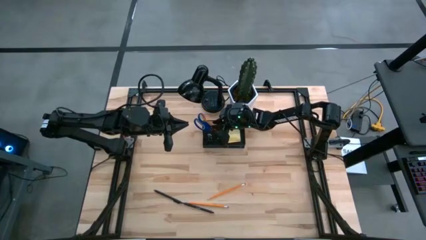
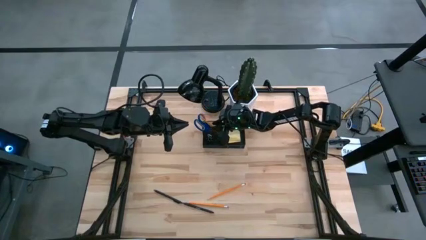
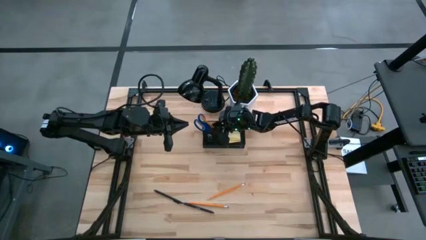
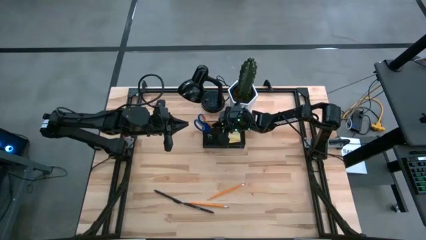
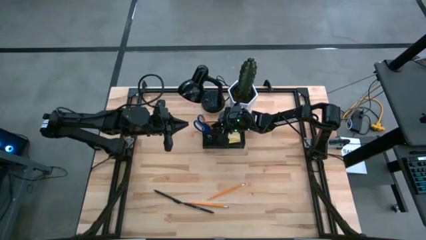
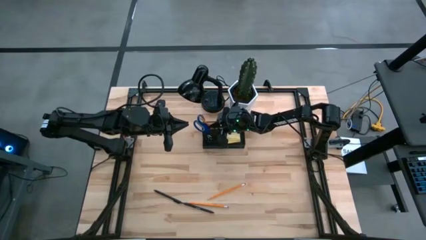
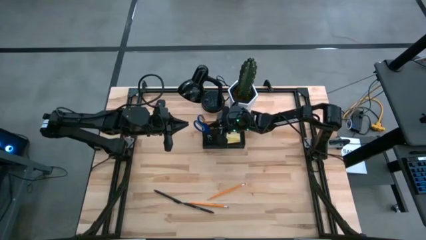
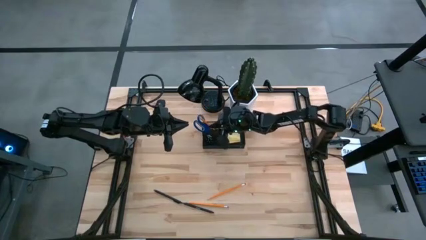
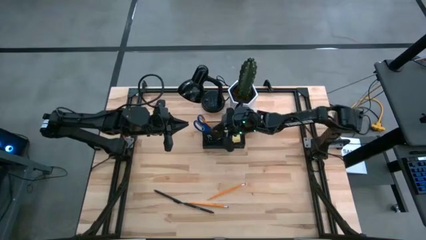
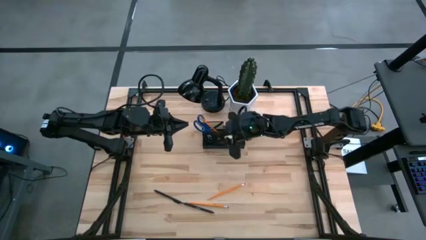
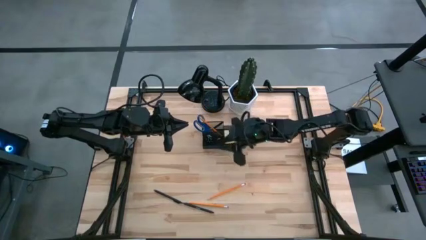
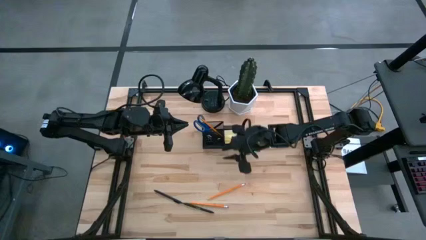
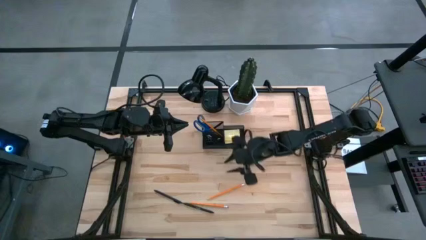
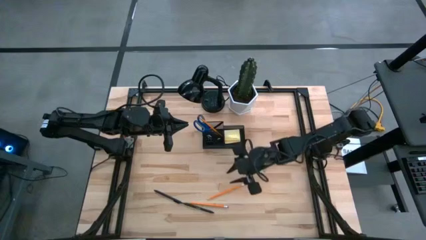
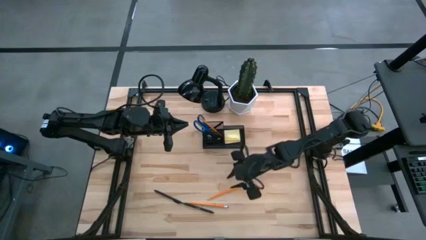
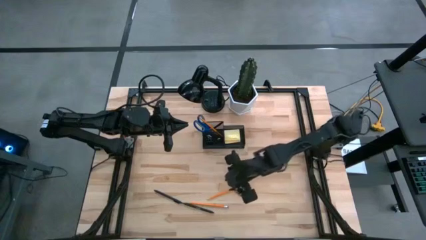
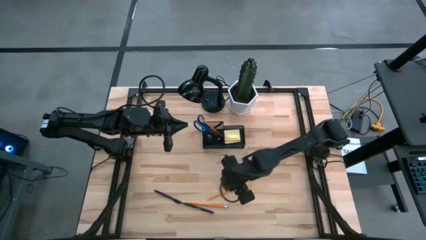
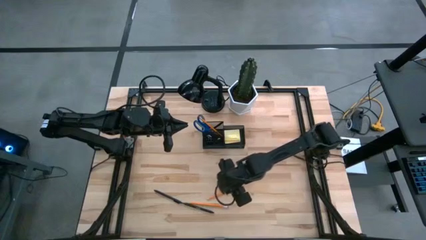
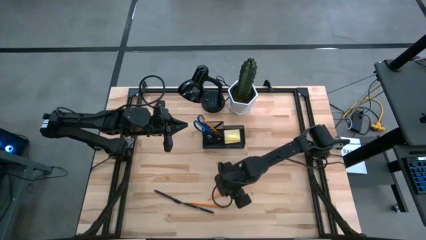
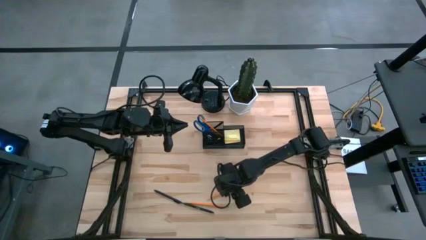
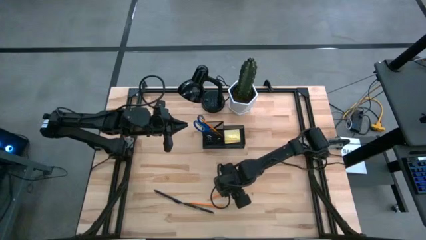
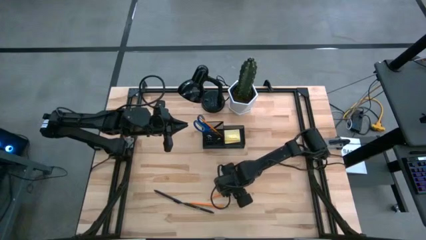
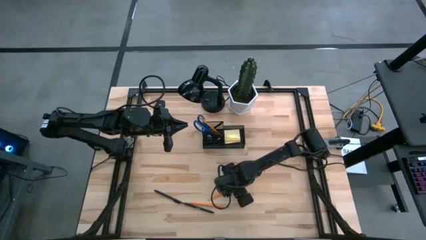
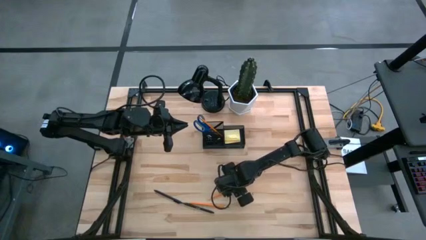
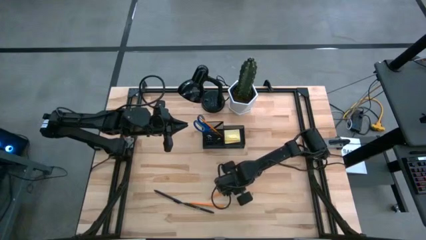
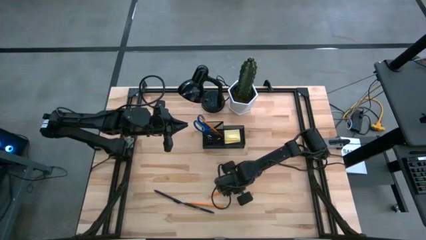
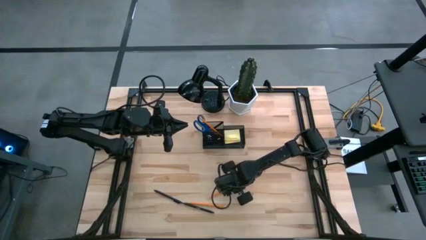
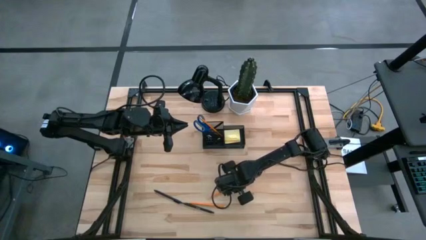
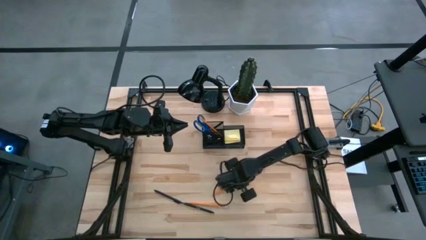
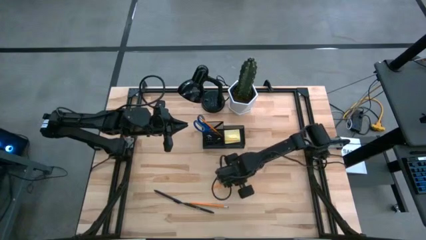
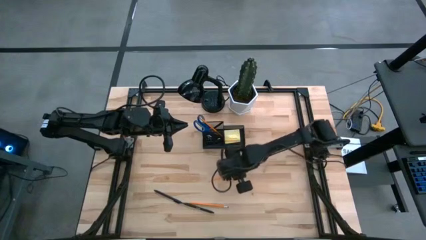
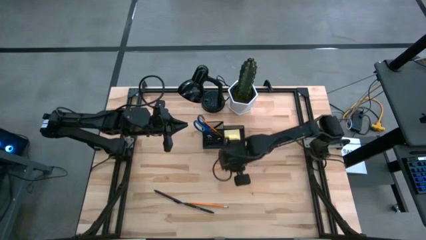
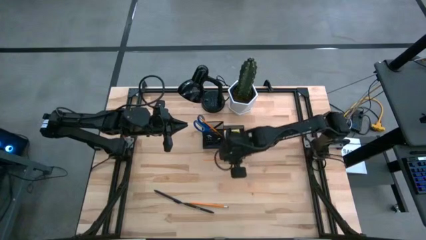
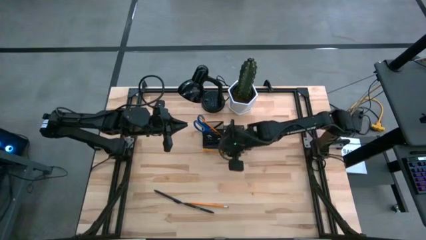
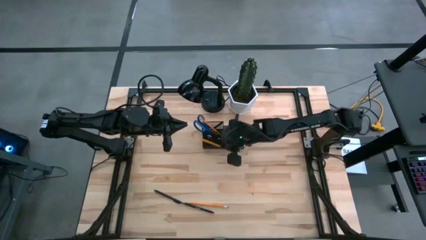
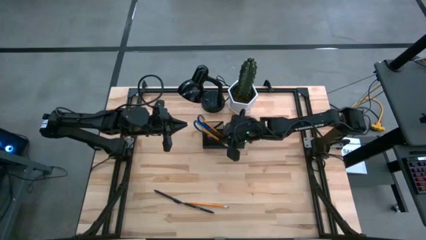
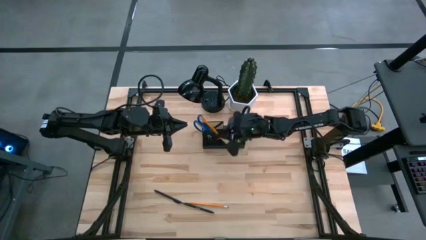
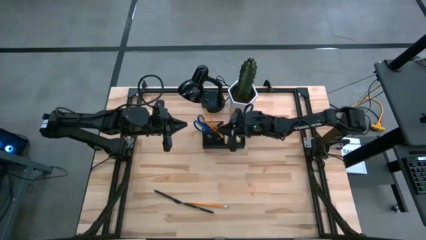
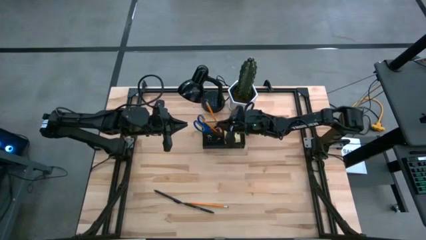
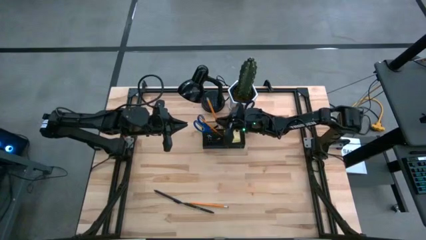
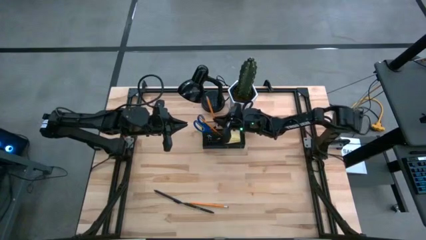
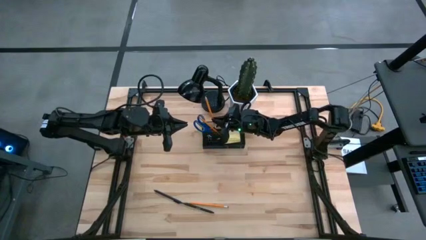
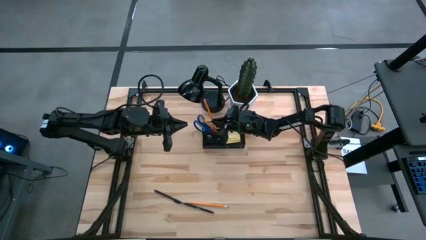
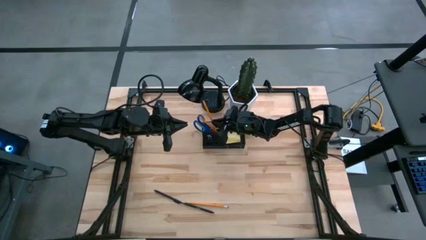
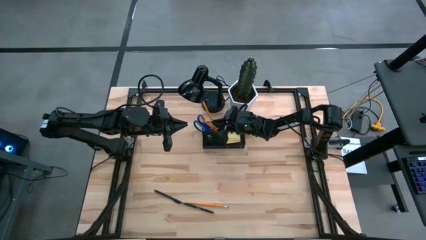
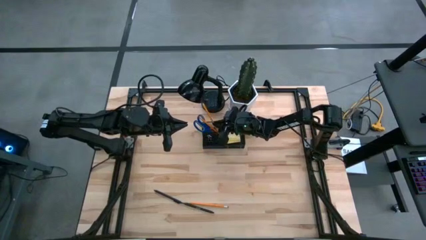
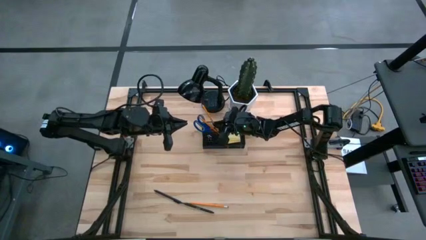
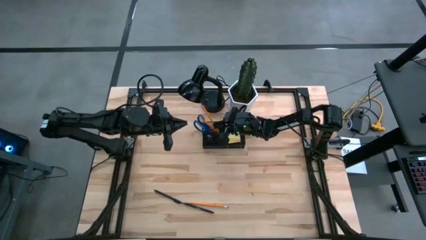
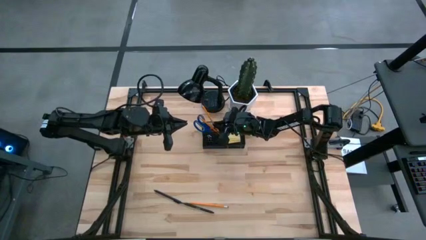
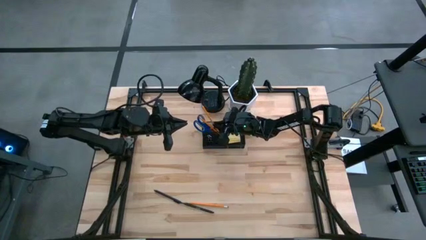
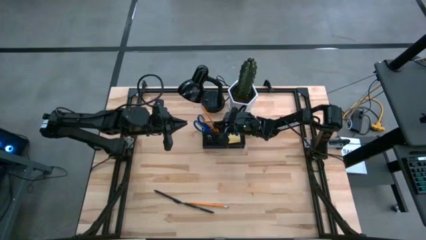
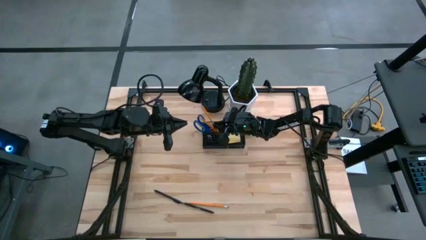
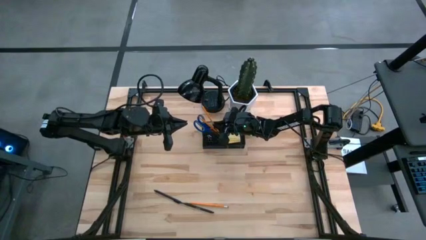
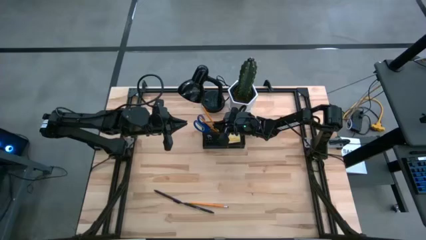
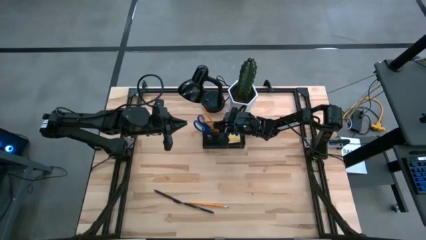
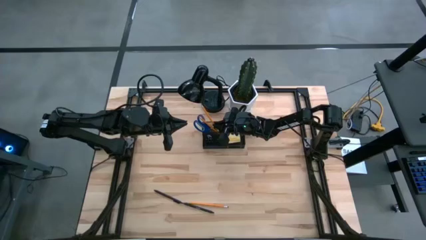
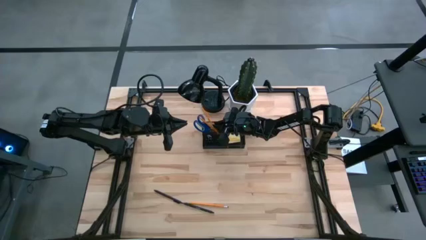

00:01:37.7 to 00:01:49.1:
Task: Pick and place office supplies into organizer
Put the top yellow pencil into the black desk organizer

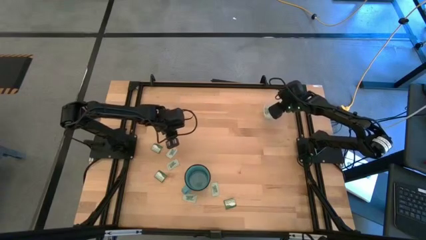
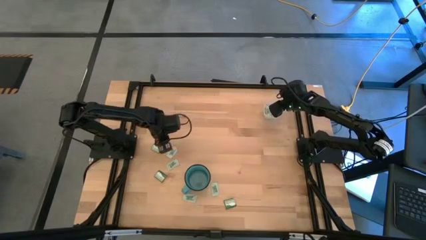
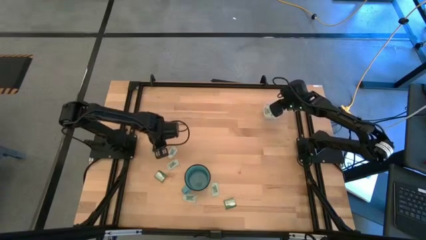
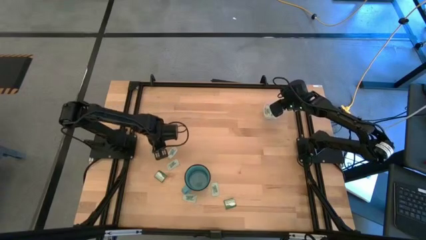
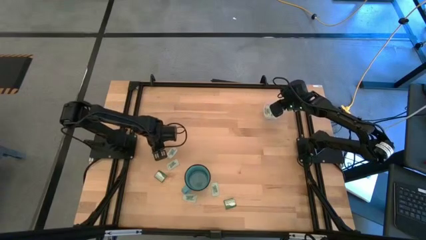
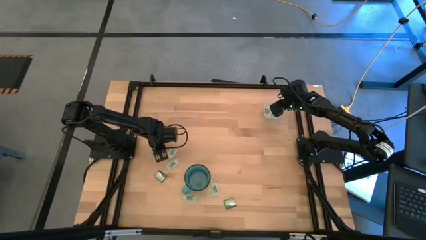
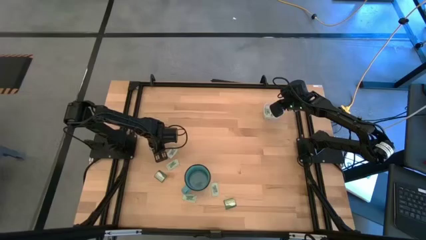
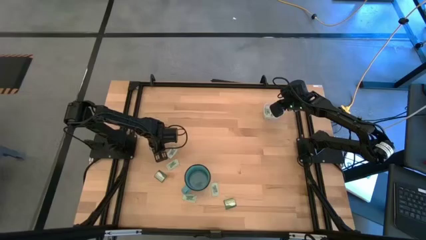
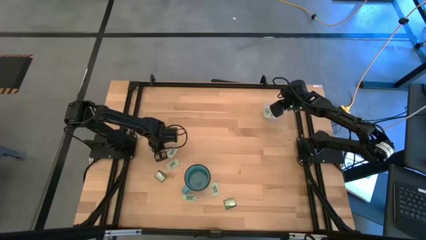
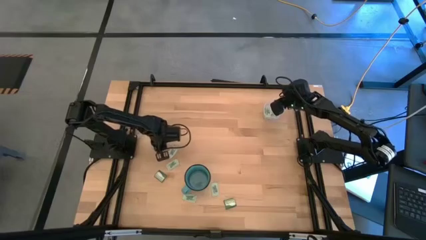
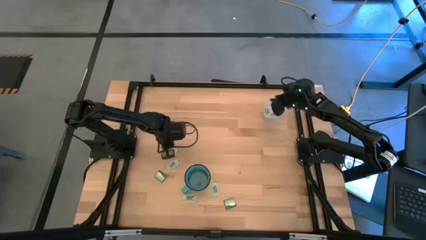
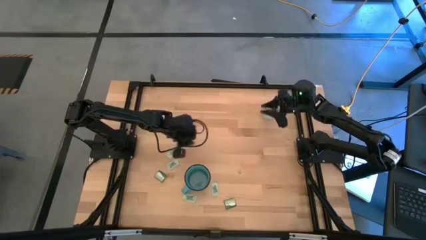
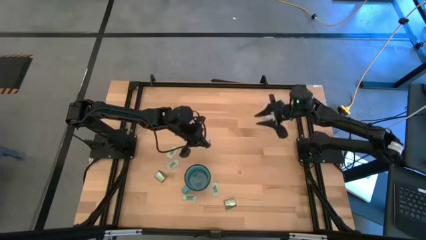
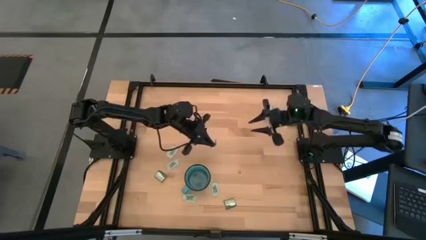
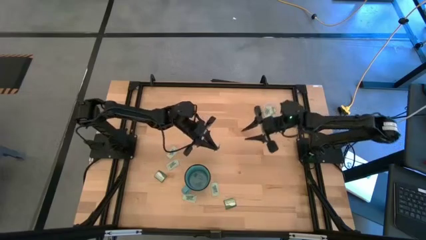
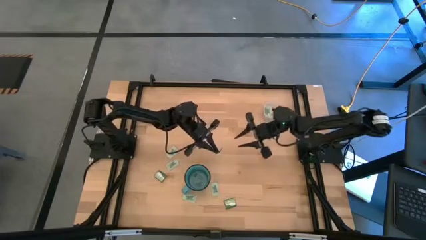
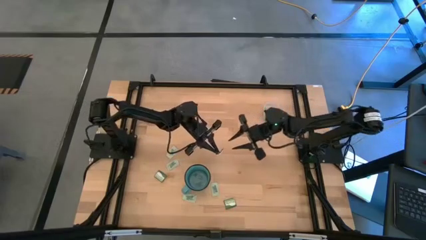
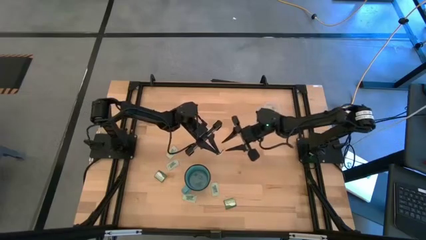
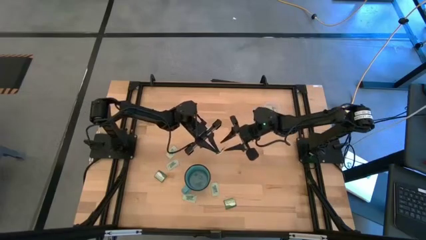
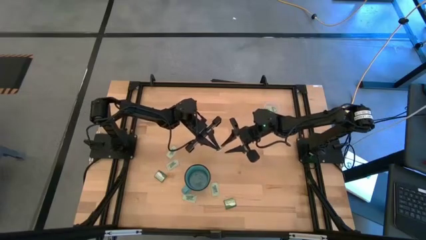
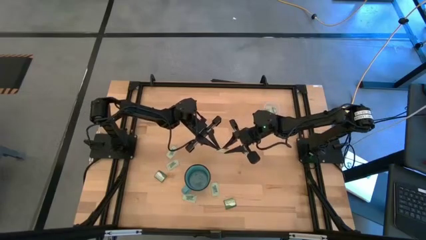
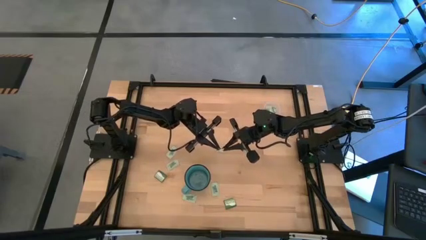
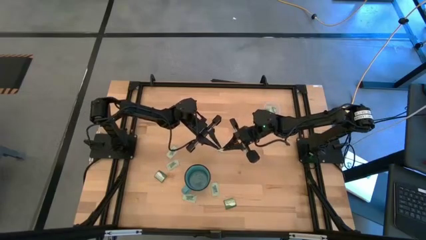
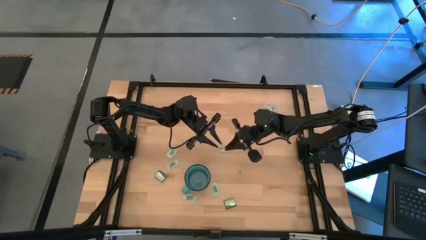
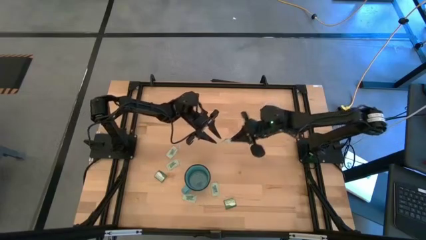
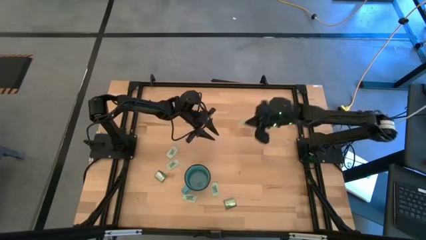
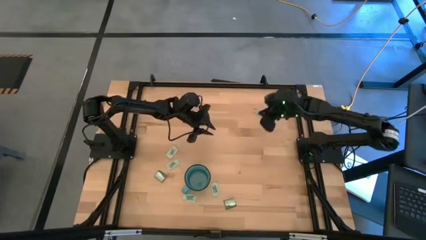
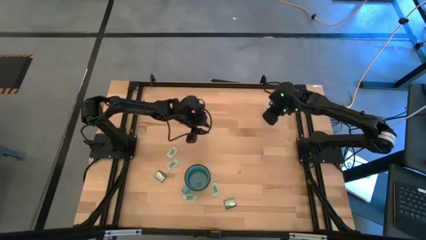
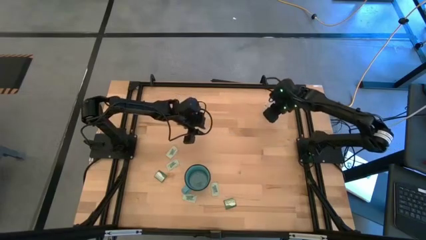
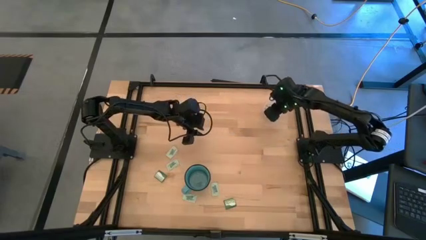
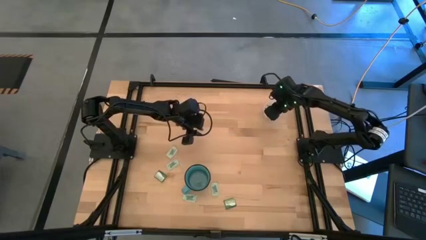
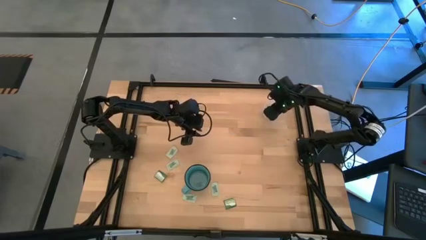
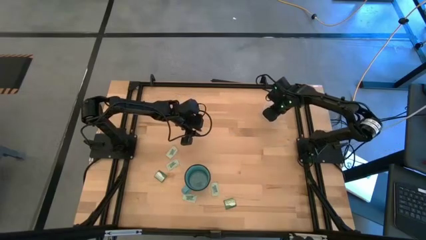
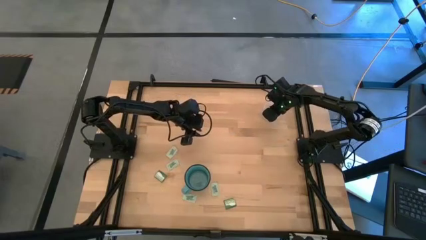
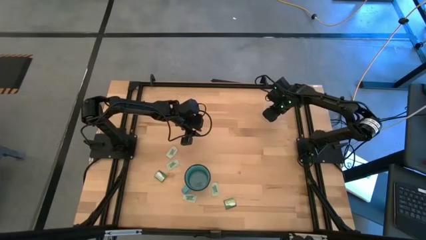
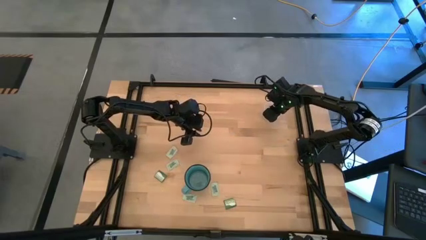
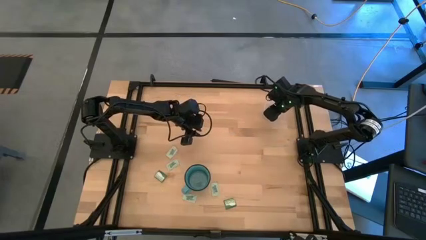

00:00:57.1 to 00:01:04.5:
Task: Pick and place items into bin
Put the truvia packet into the transparent bin
